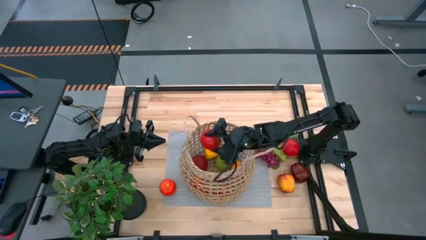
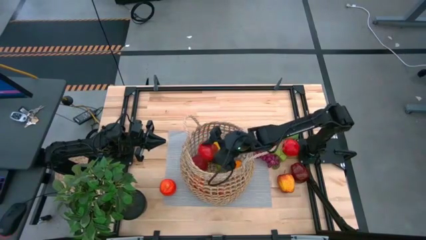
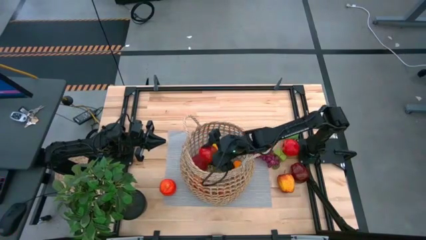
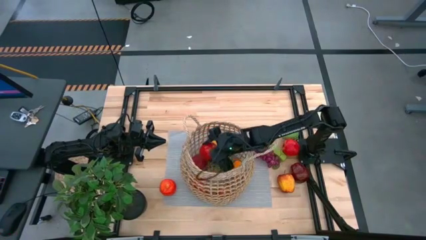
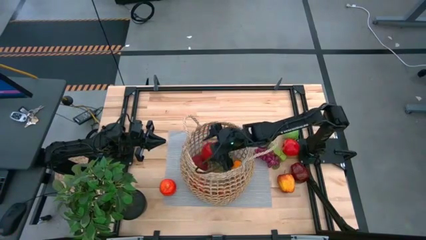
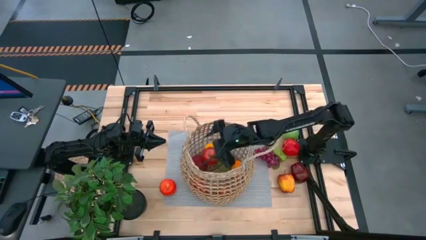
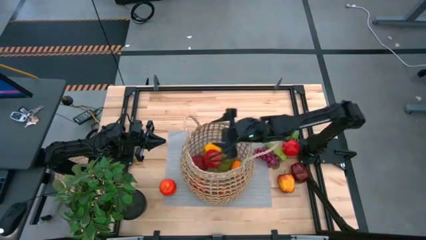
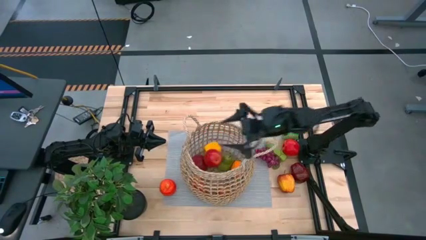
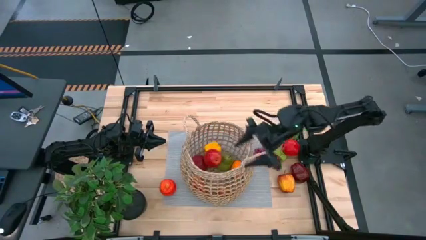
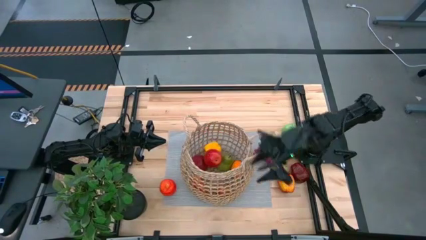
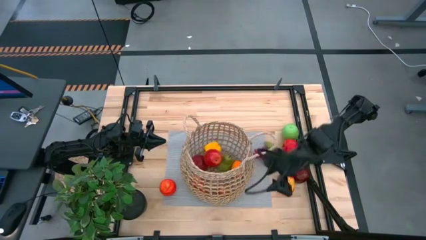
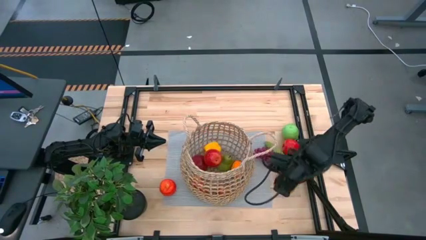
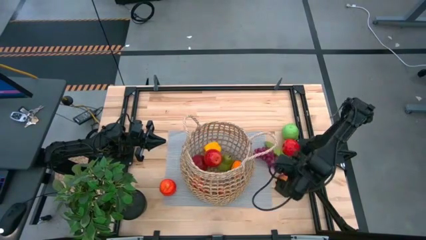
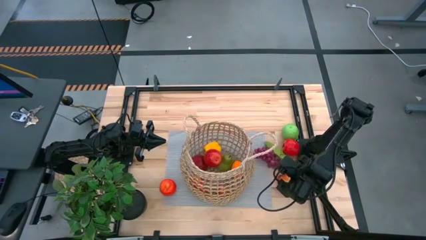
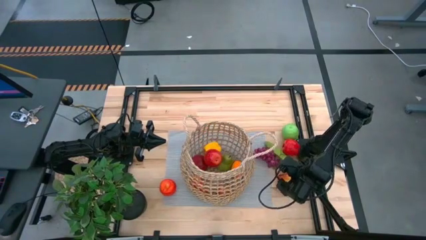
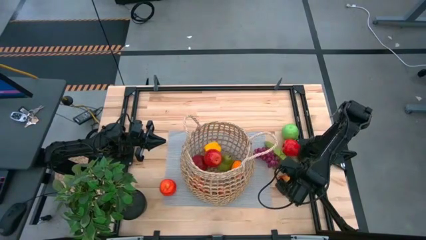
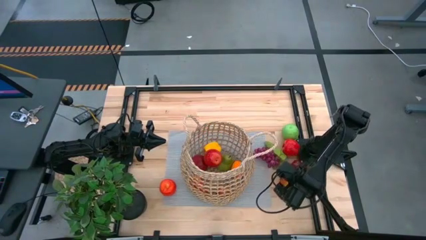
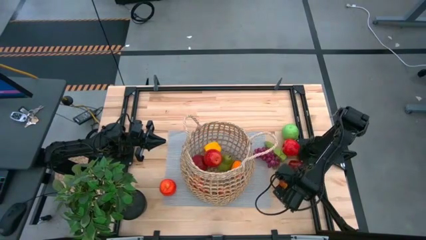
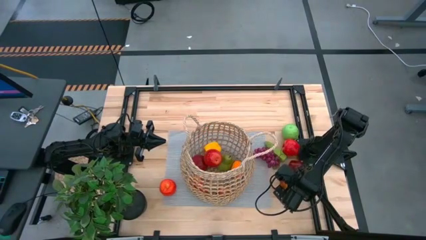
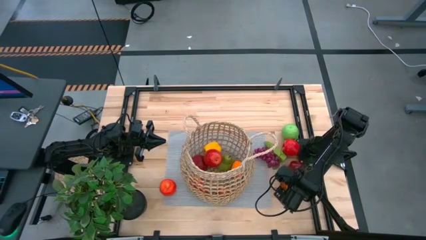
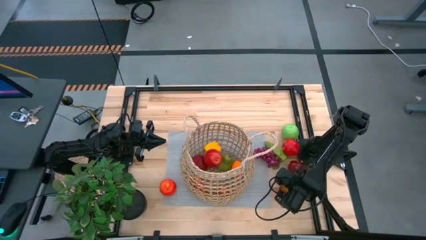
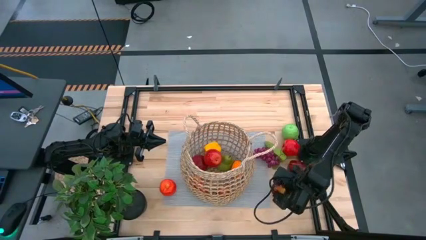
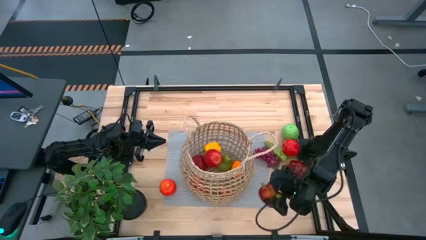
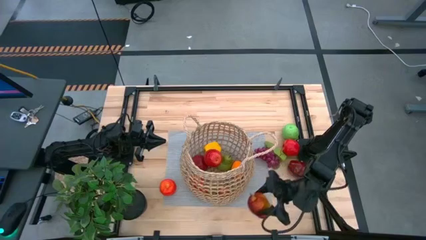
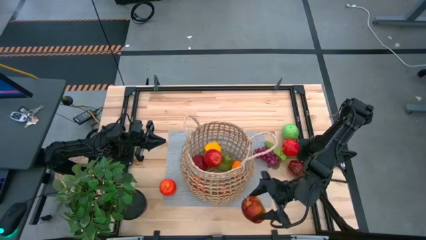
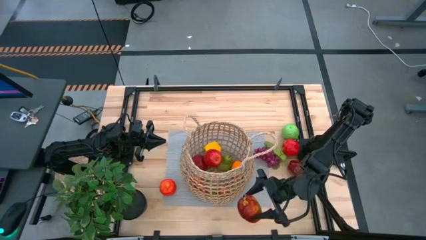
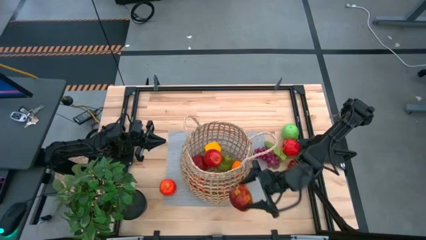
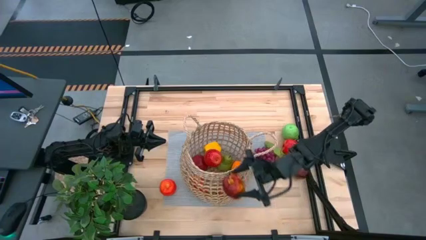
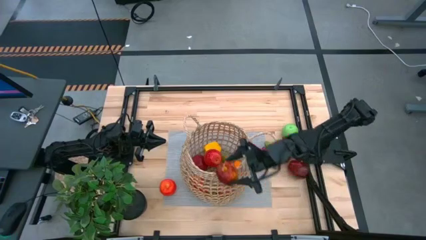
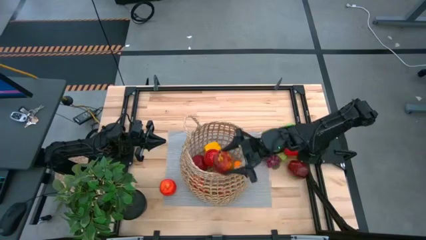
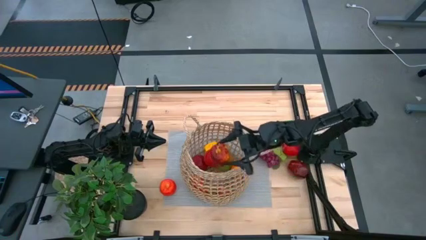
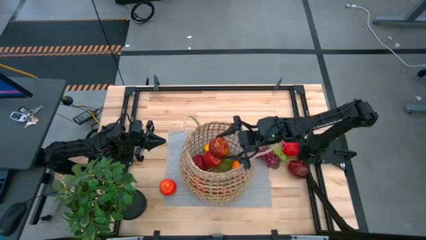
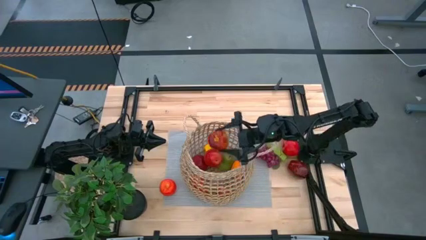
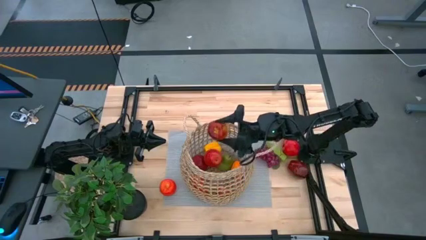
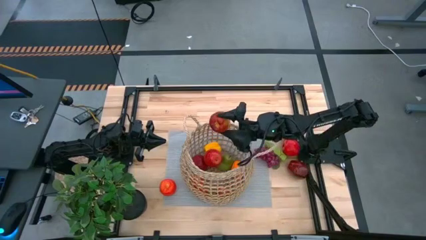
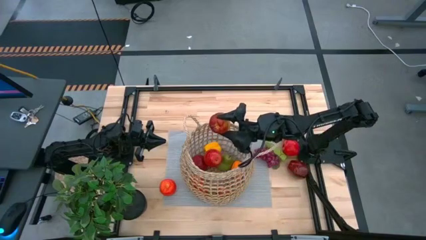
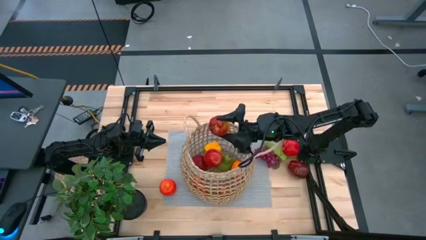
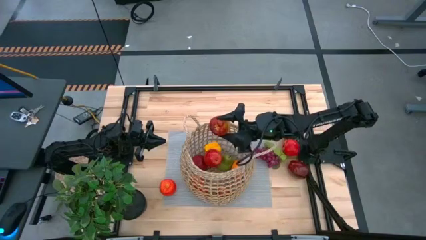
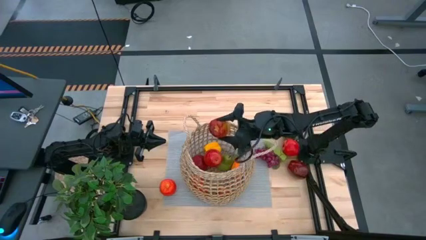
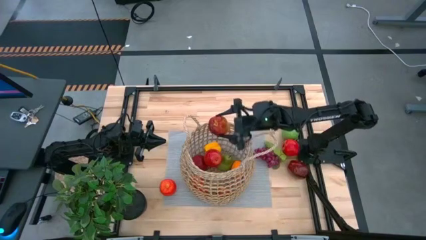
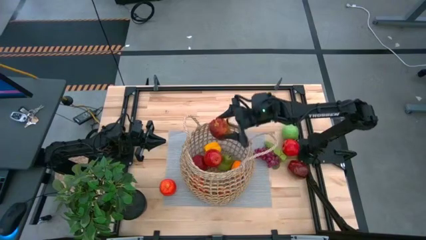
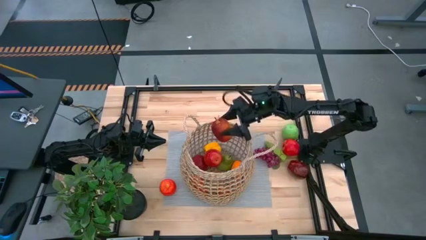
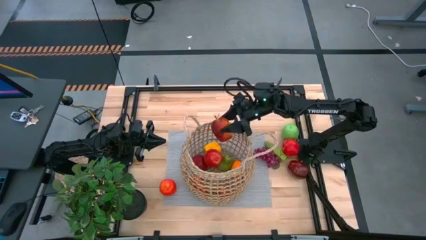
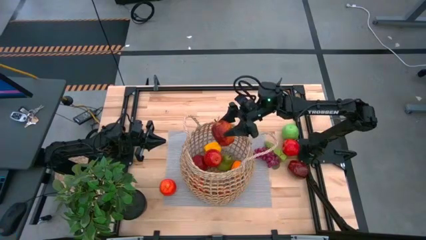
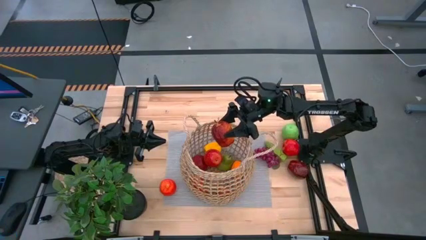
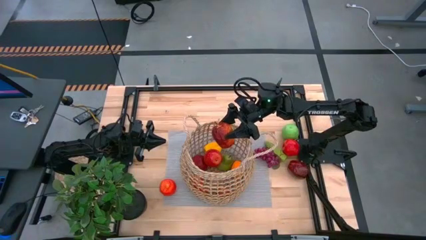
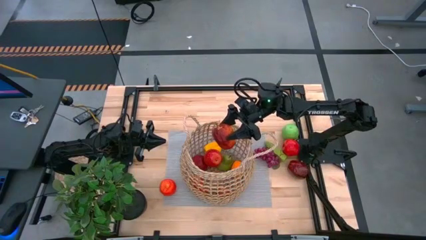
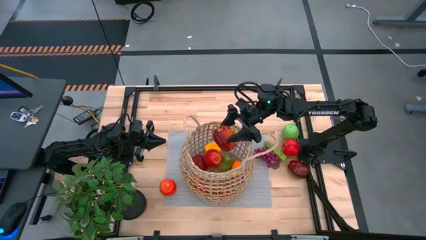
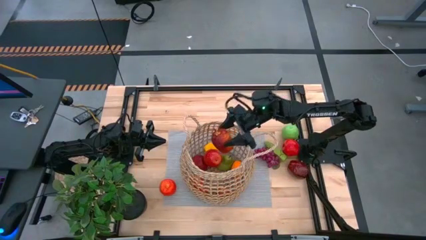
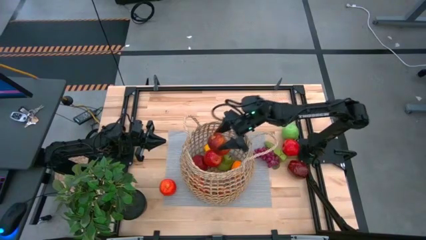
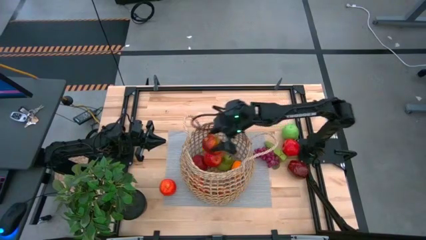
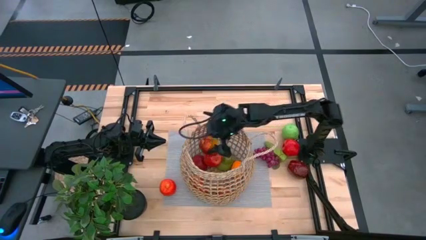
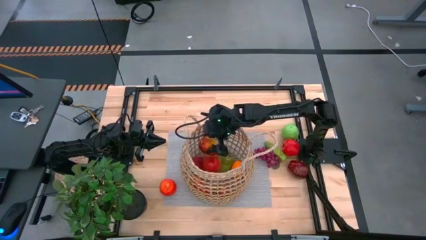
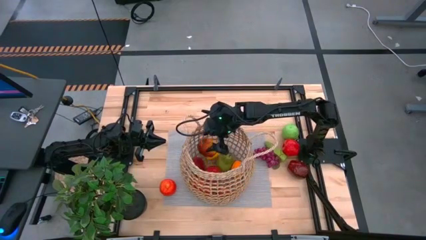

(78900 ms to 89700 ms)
Task: Build produce basket
Put the red apple into the brown basket

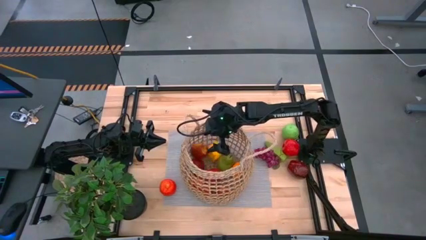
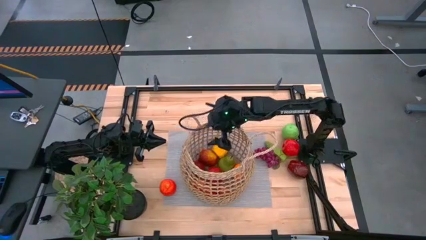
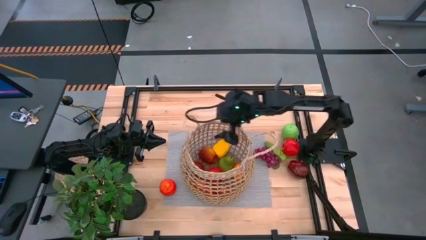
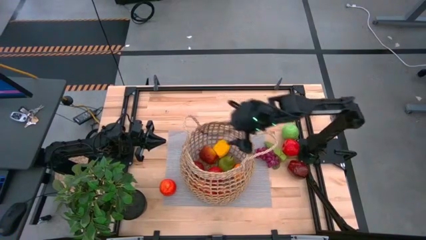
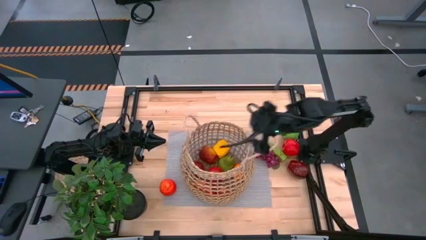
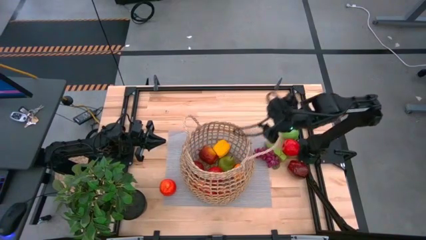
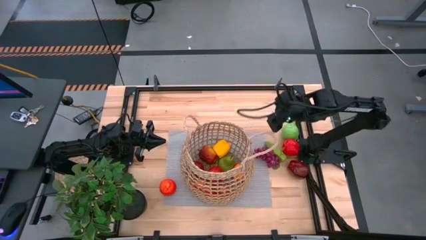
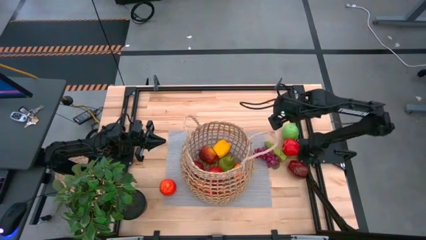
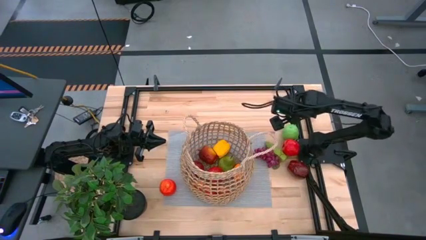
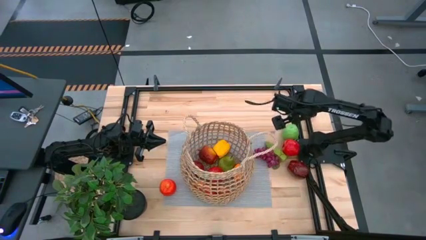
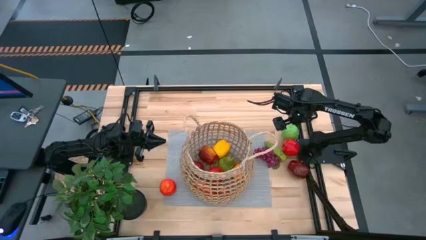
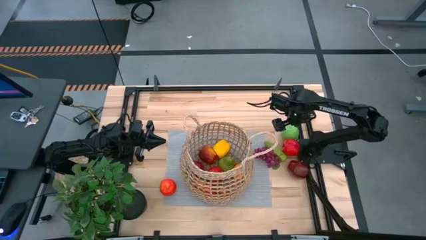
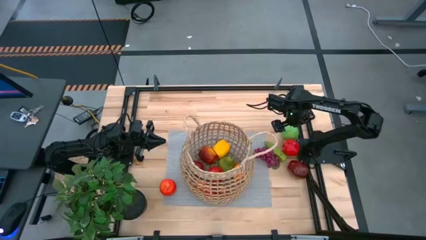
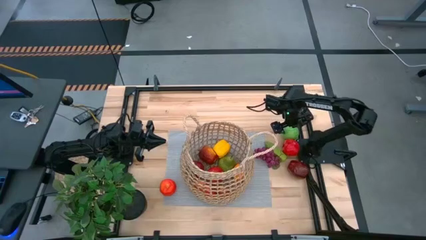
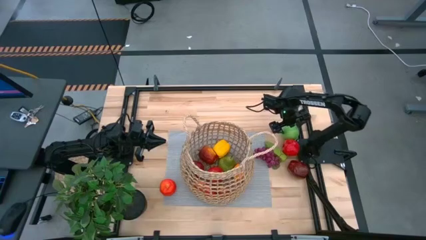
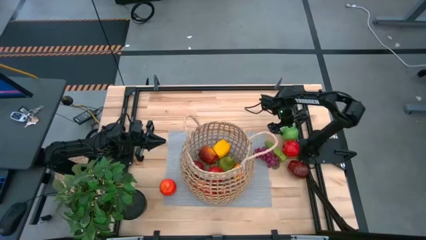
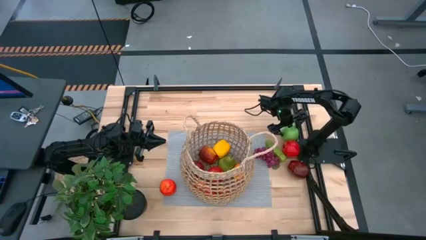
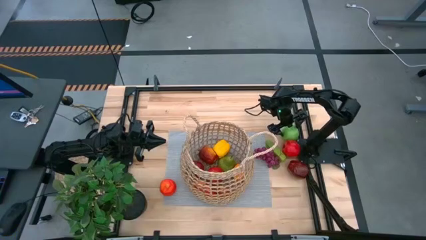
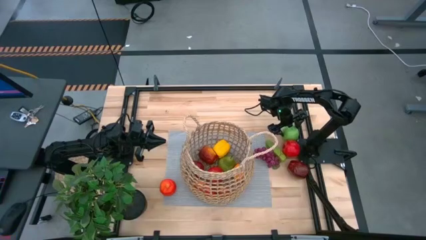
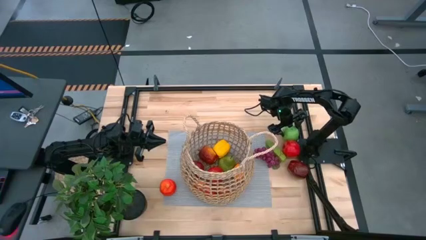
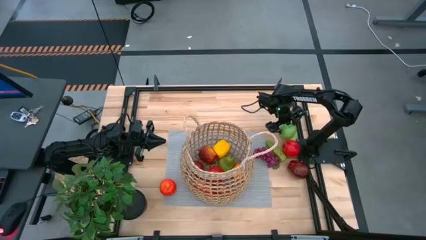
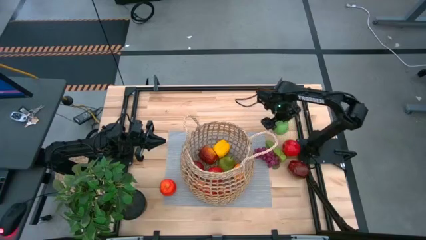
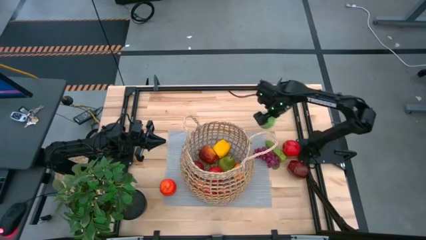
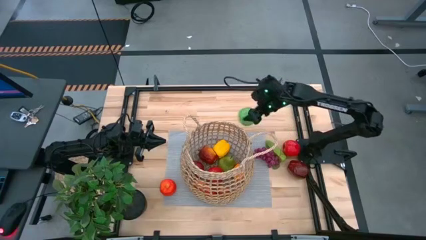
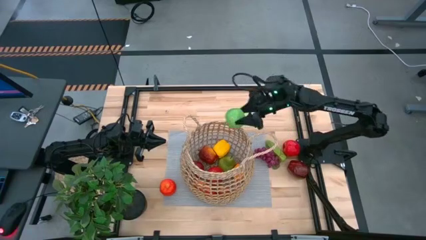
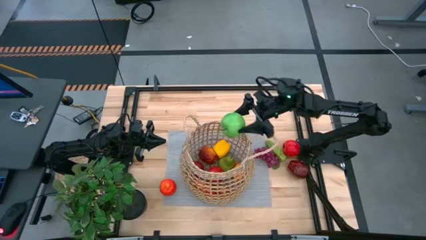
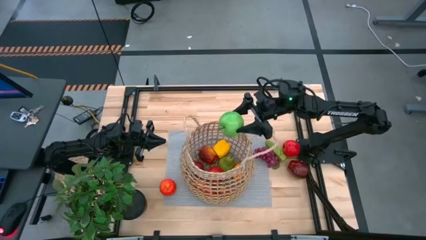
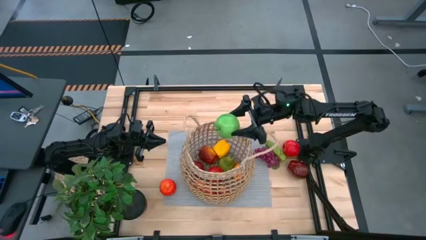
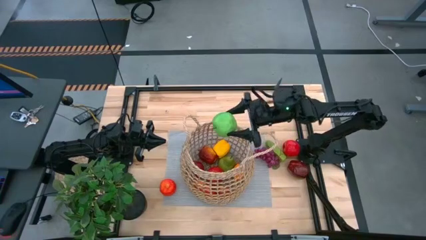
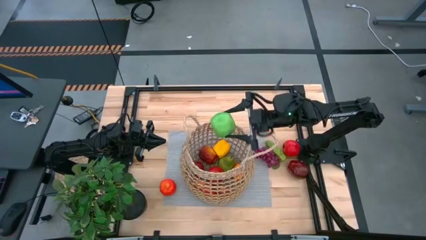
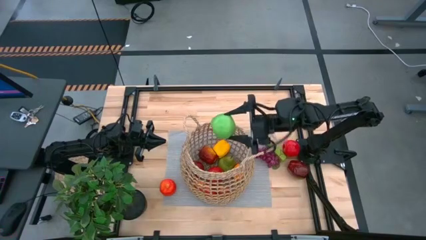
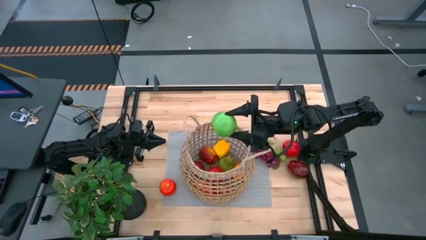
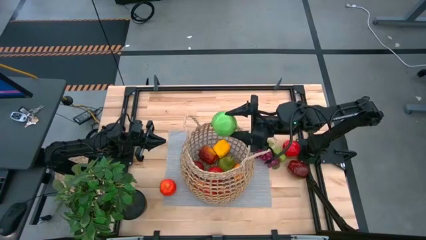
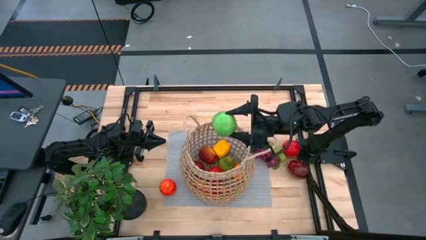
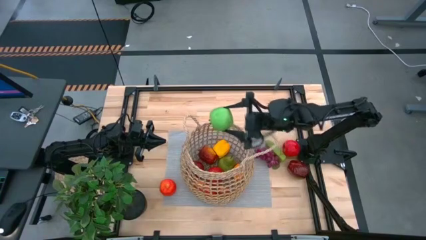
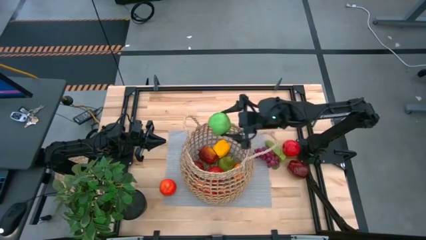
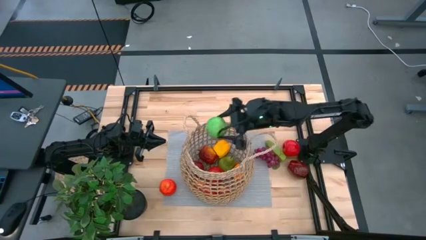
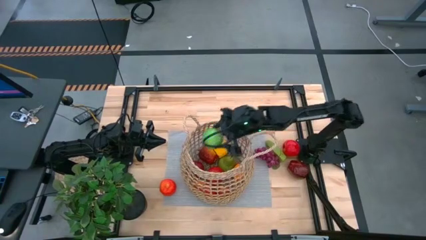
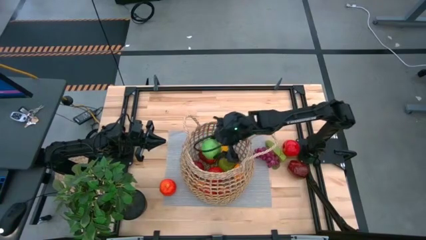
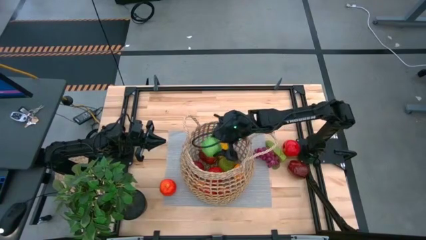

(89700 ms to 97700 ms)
Put the green apple into the brown basket
